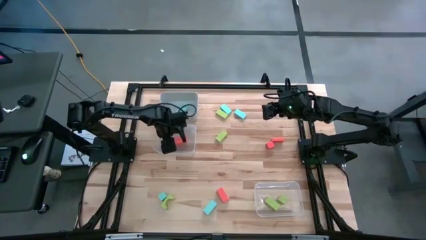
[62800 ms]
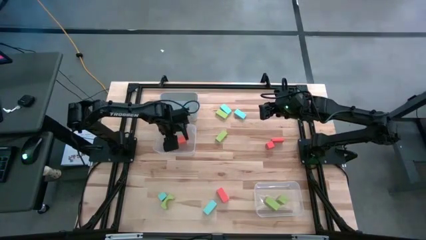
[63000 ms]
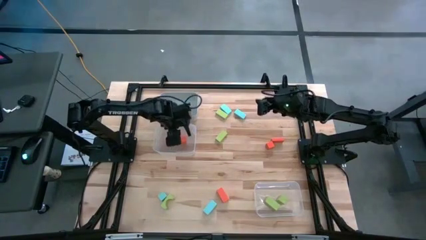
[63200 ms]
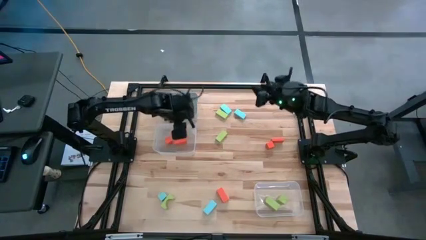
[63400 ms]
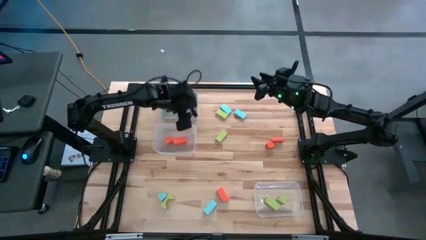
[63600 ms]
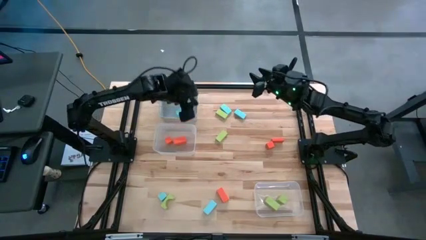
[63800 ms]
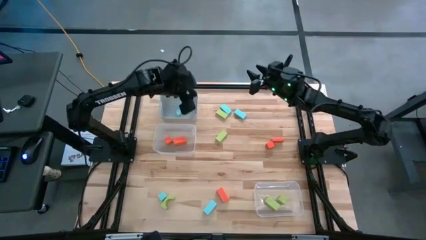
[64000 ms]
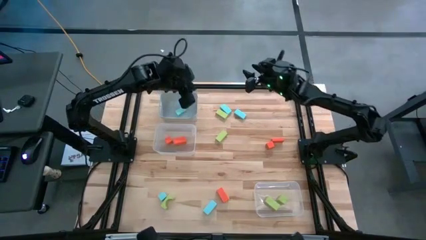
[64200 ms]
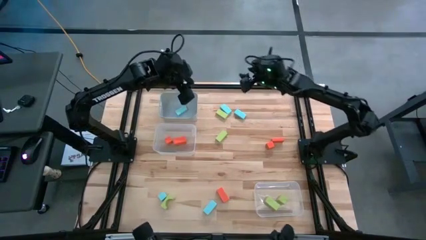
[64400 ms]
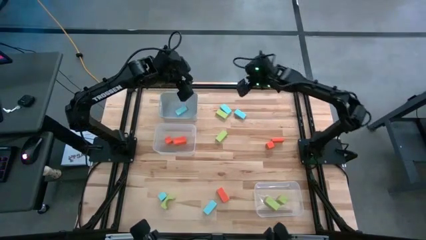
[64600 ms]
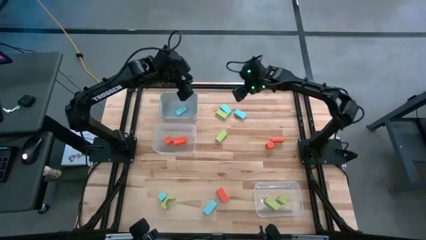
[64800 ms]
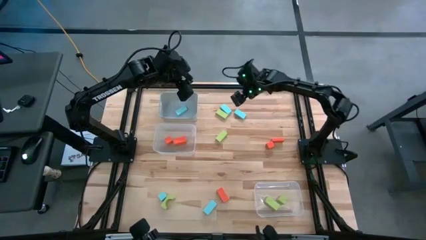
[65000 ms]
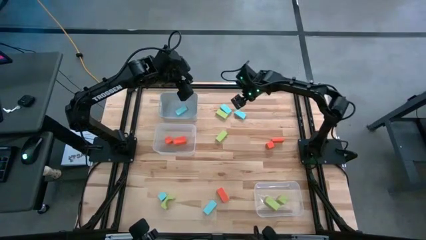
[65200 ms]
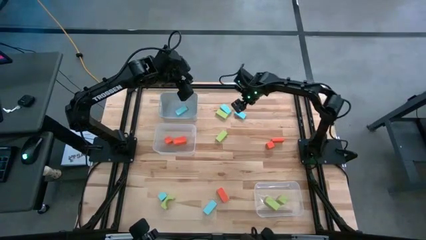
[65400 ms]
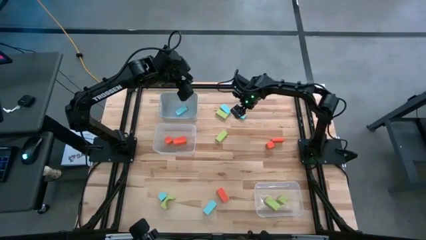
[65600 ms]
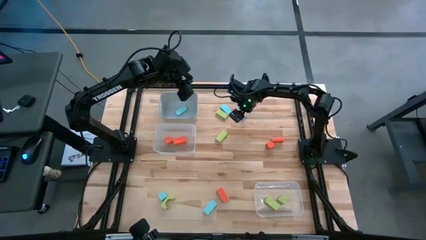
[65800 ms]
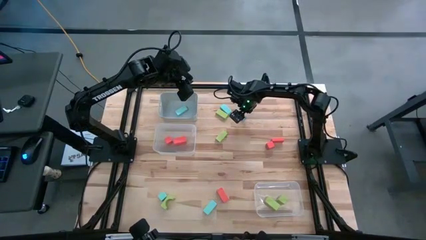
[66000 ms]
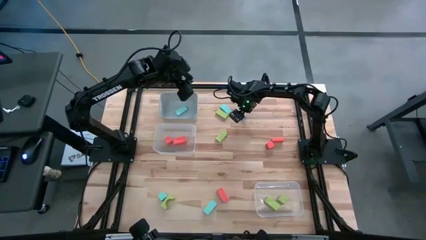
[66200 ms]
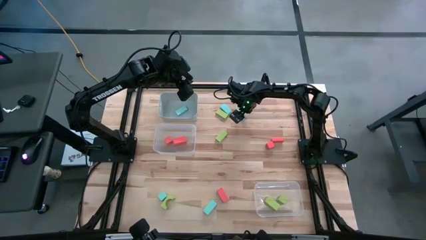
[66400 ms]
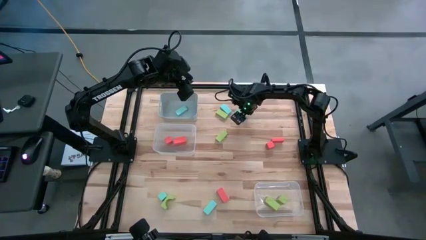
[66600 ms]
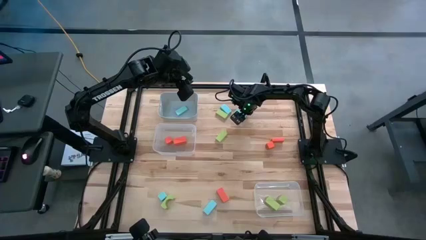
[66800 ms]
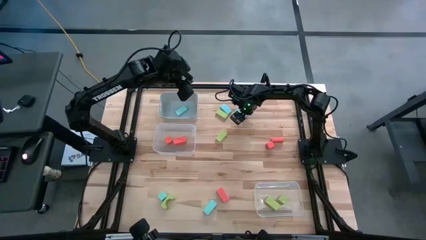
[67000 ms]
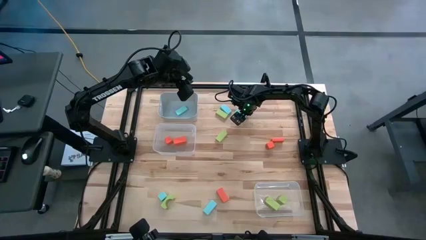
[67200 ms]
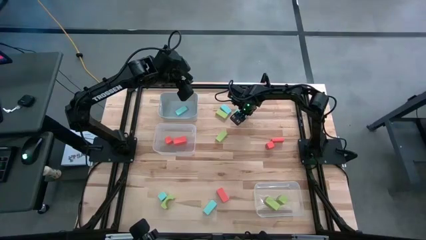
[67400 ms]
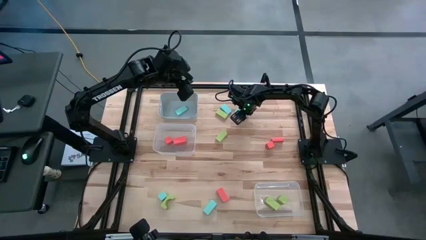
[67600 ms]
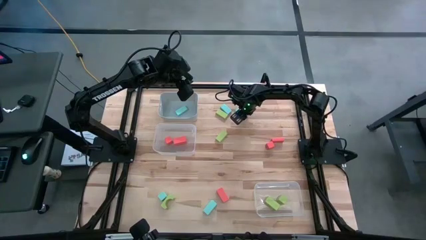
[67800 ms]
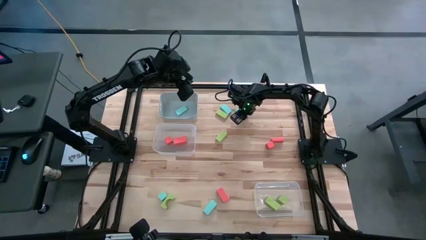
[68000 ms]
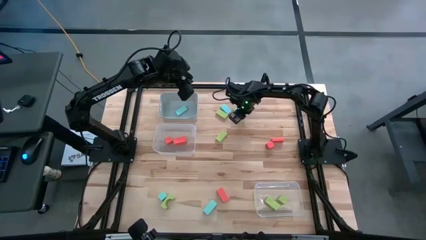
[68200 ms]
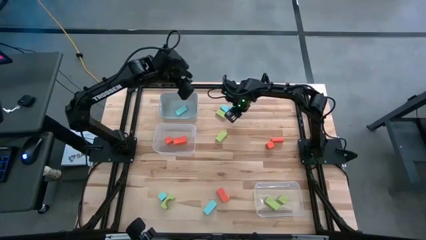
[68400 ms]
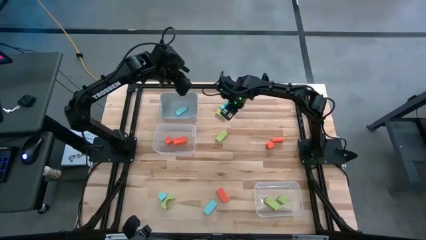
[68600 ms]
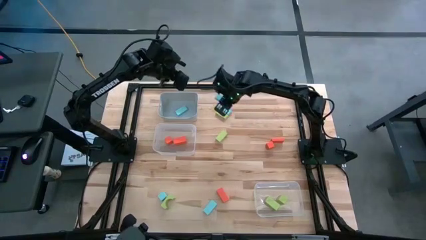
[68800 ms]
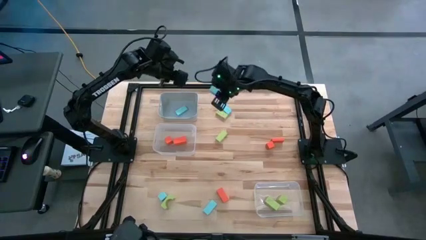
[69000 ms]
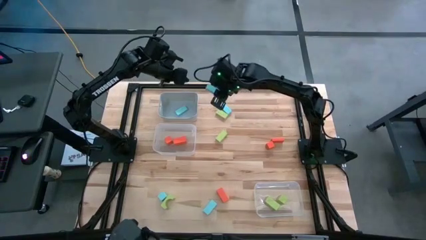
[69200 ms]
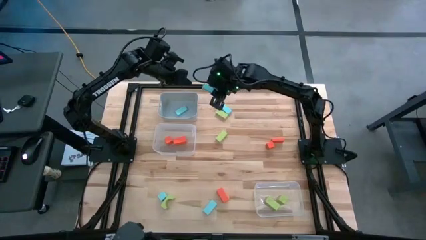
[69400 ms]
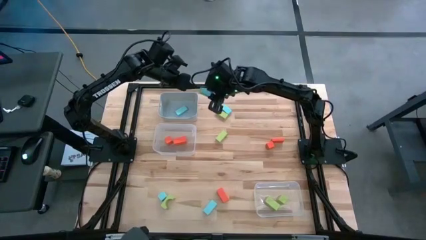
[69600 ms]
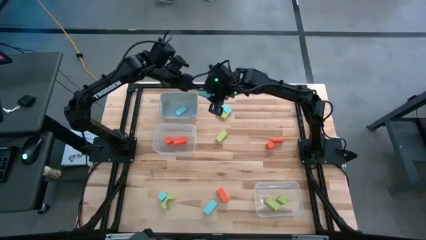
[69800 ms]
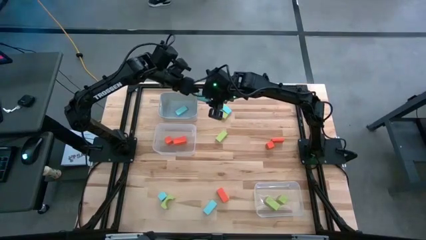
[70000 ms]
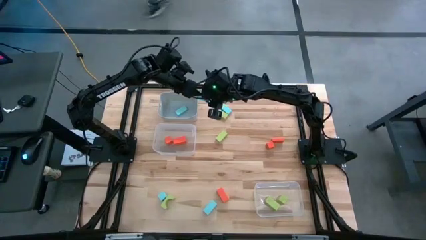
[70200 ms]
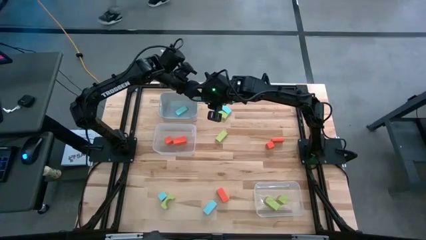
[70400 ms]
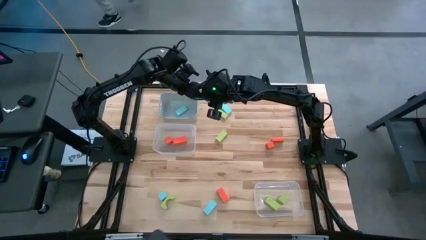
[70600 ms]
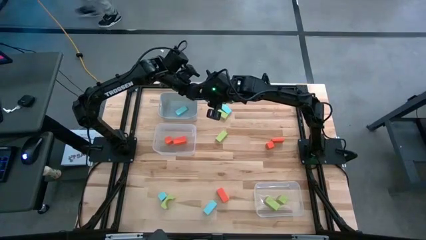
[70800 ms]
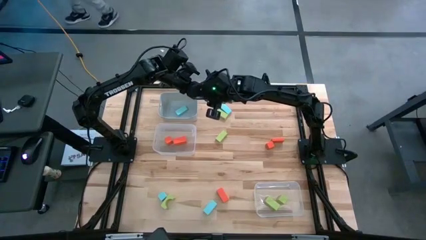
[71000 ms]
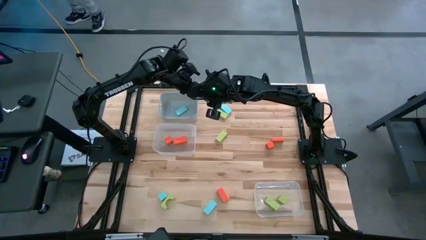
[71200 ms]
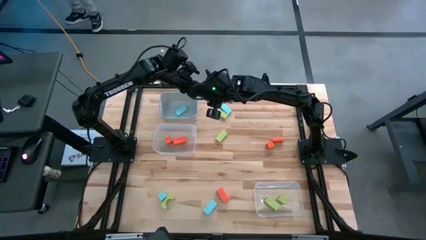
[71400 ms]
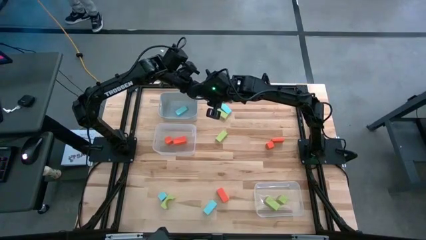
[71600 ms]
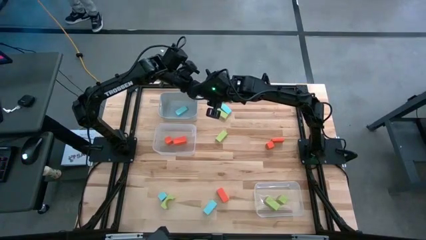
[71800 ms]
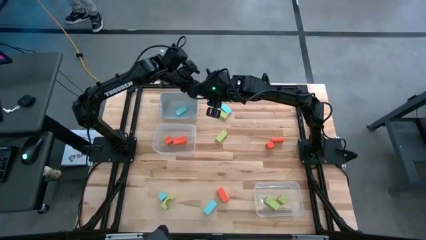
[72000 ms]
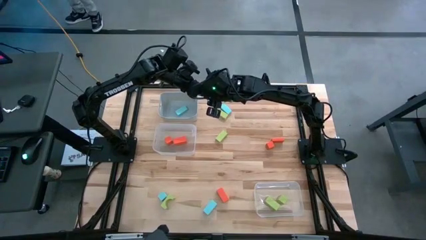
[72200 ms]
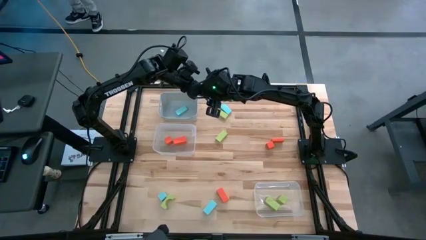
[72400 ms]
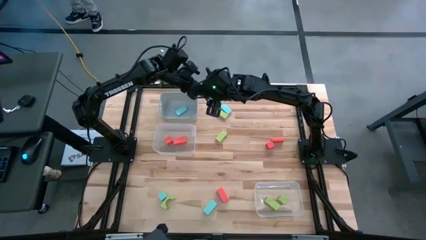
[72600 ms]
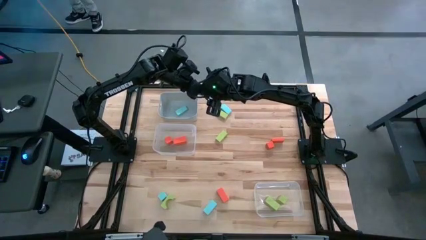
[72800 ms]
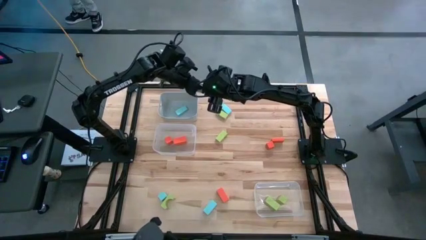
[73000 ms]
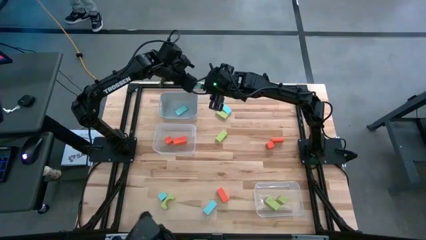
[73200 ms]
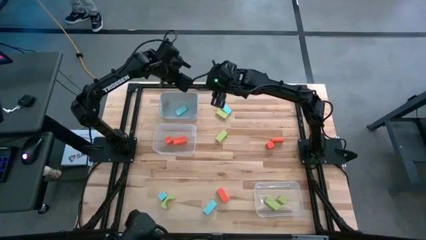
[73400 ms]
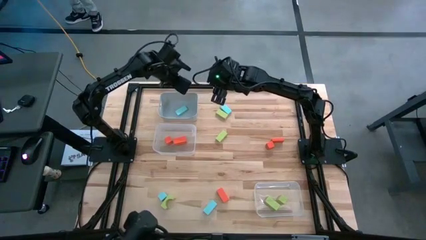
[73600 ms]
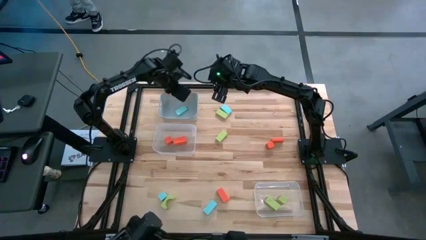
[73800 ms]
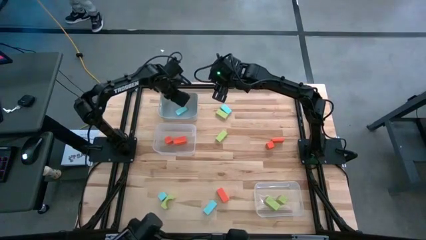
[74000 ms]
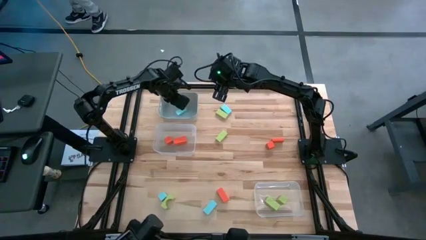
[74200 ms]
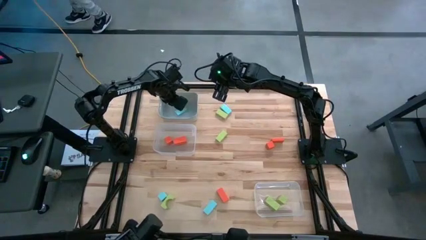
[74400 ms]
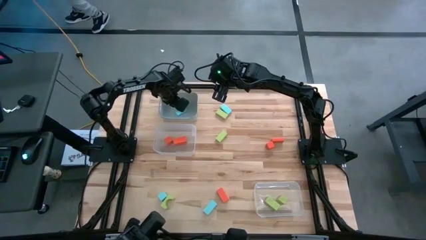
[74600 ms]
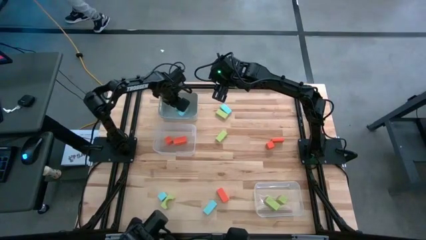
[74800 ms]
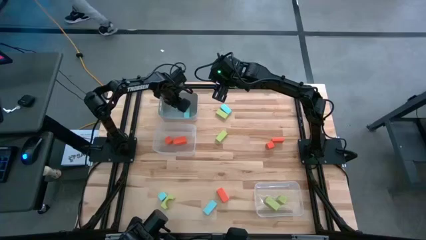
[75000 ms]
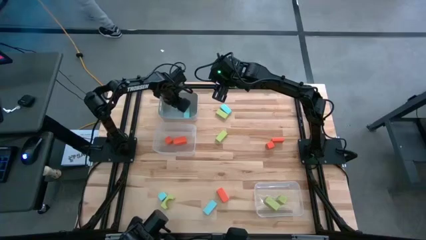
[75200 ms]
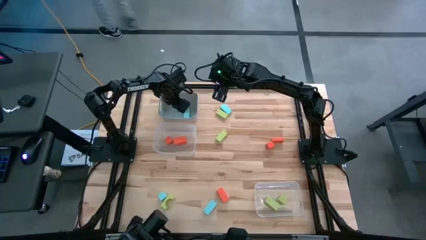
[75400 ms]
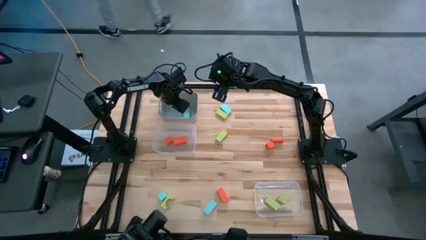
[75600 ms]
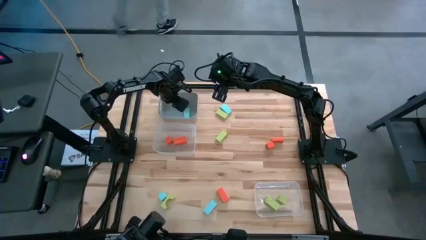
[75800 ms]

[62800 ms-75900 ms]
Task: Sort & place blocks by color
Put the blue block into the gray bin

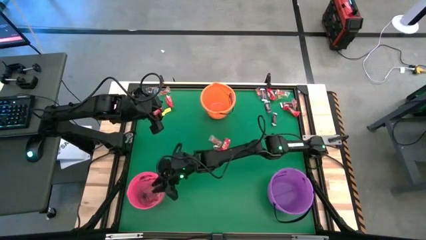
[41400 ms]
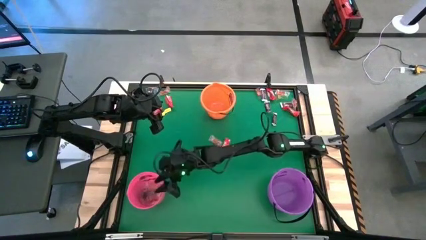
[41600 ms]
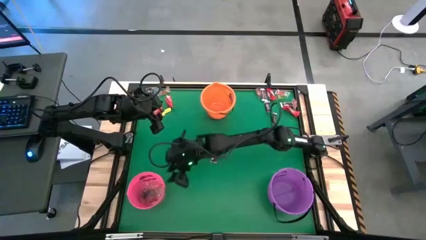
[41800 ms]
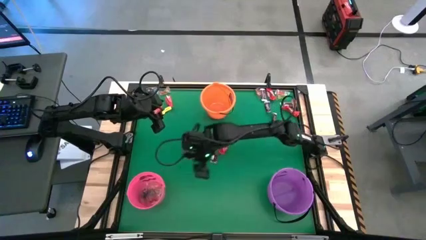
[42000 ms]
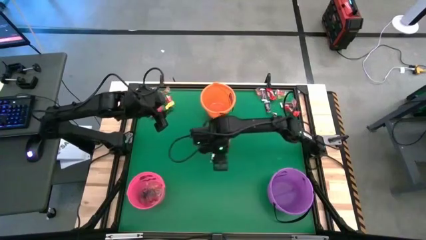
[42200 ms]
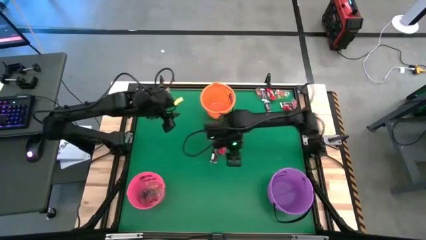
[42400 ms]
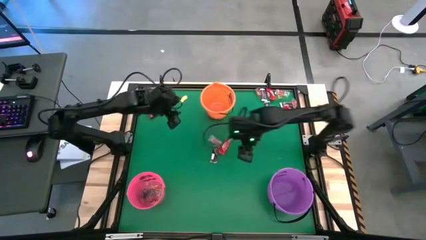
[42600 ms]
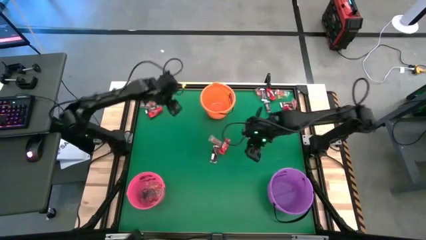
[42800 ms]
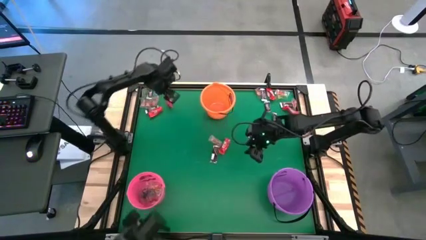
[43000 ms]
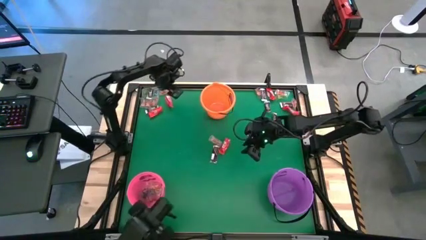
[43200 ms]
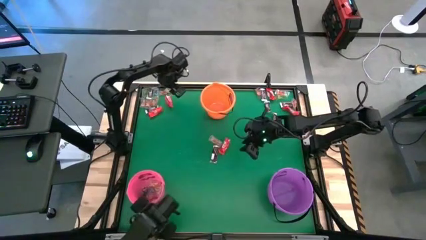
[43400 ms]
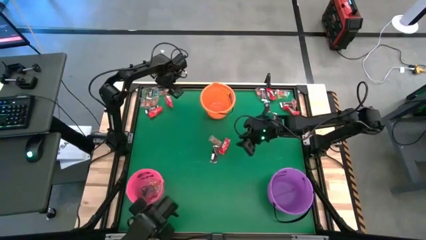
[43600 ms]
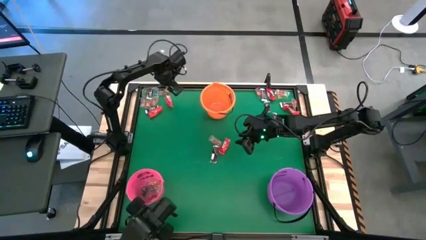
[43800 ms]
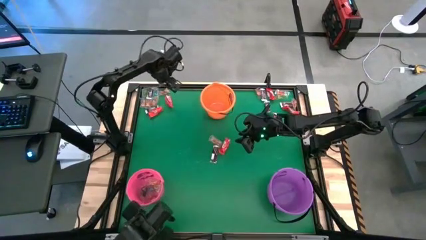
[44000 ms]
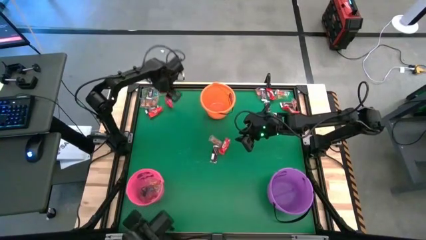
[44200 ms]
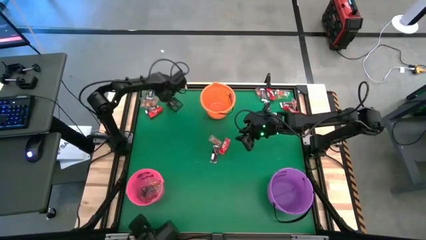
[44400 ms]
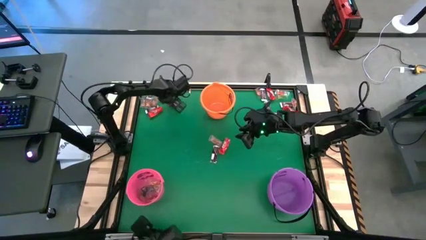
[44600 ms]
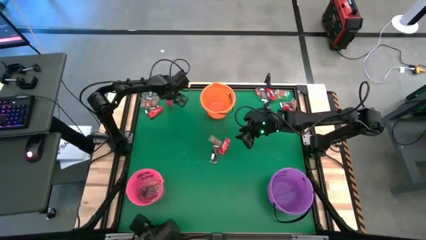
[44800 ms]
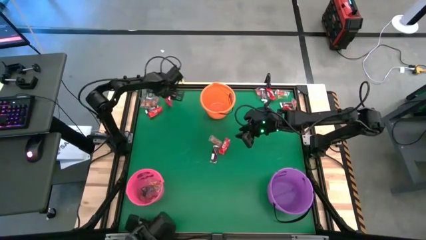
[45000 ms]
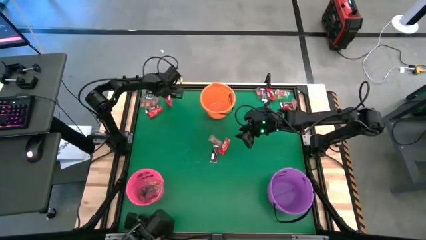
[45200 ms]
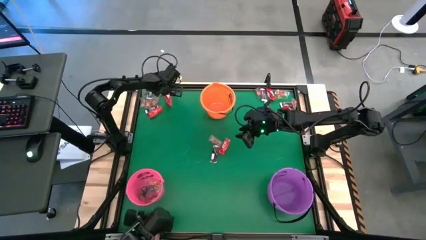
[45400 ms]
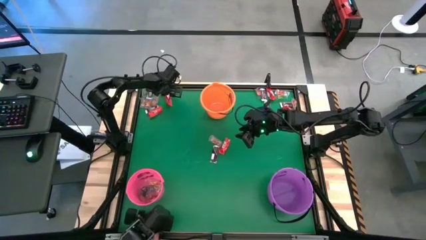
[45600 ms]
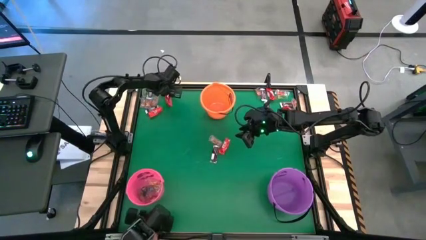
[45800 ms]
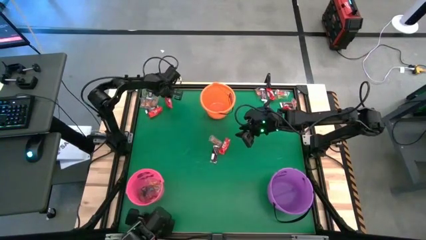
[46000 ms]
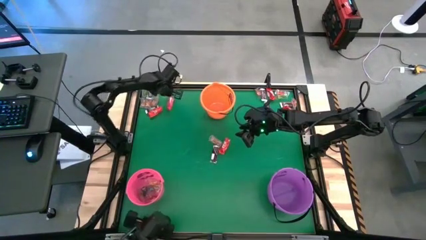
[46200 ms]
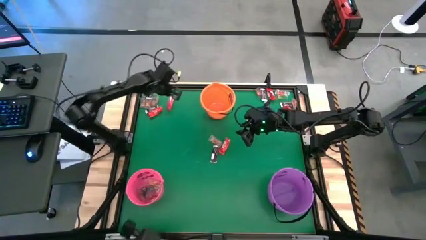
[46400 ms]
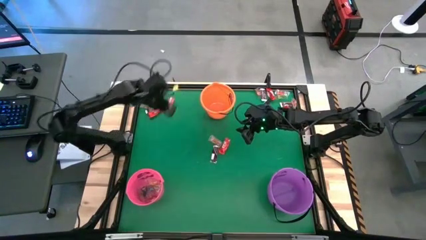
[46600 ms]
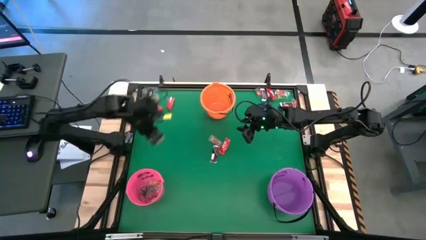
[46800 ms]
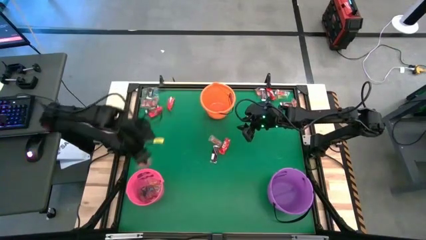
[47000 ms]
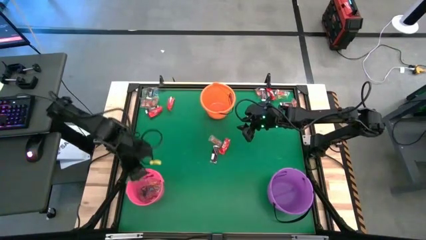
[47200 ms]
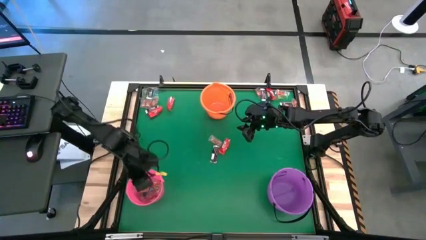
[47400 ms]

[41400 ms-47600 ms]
Task: Sort candy by brand, put in halloween buckets
Put the orange gummy into the pink bucket
